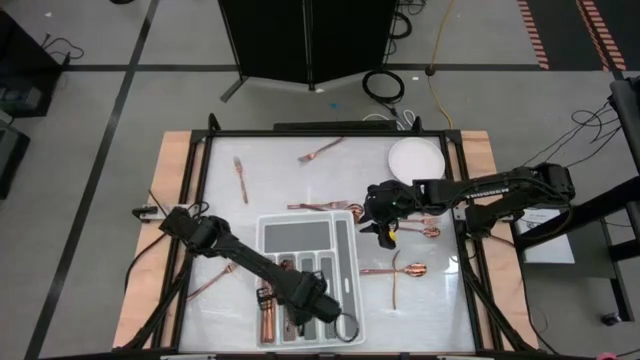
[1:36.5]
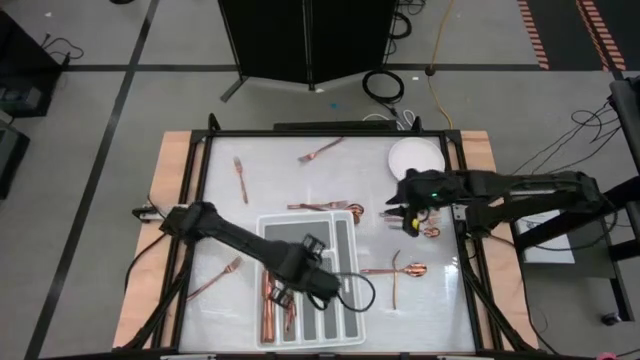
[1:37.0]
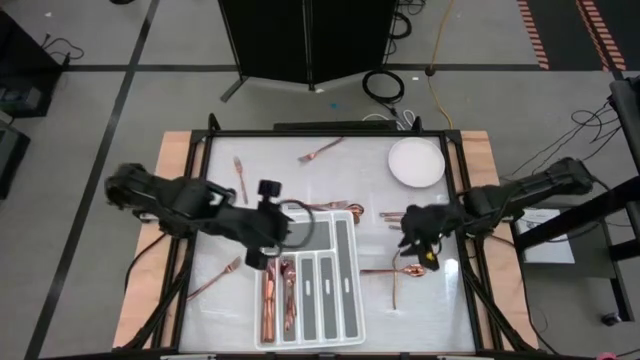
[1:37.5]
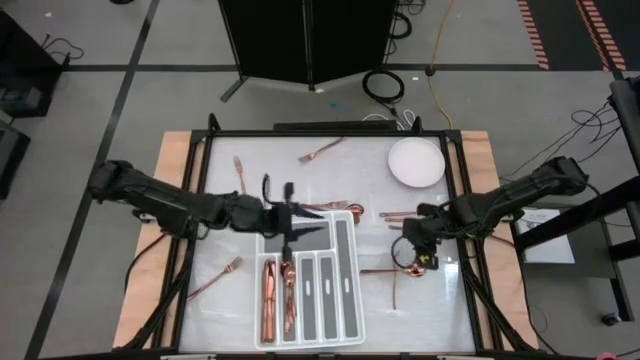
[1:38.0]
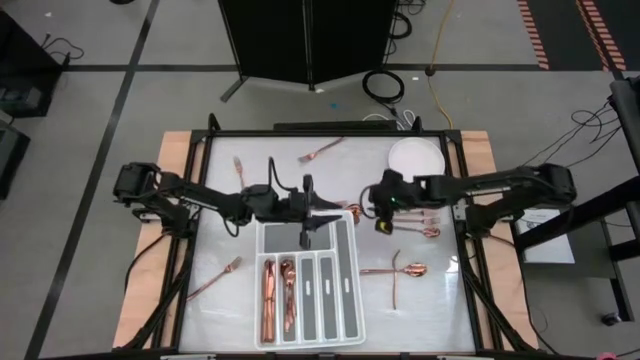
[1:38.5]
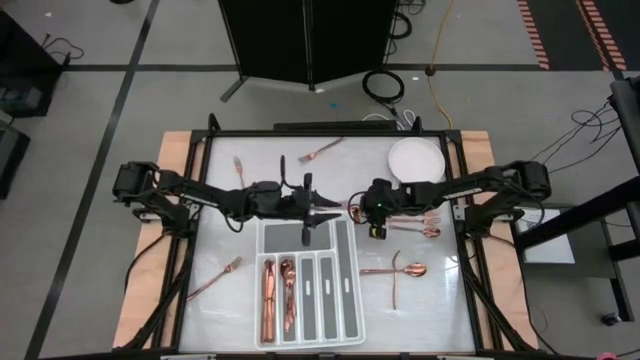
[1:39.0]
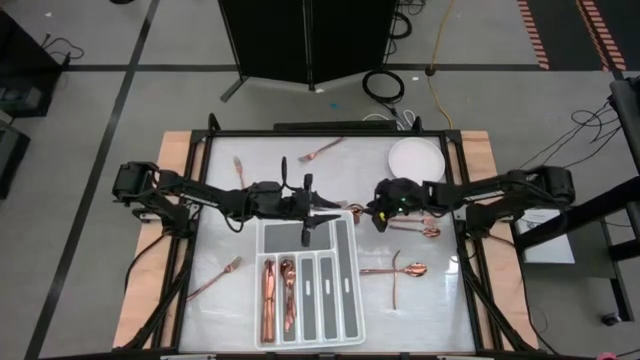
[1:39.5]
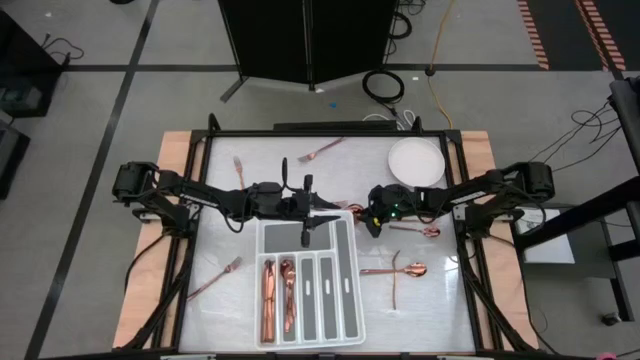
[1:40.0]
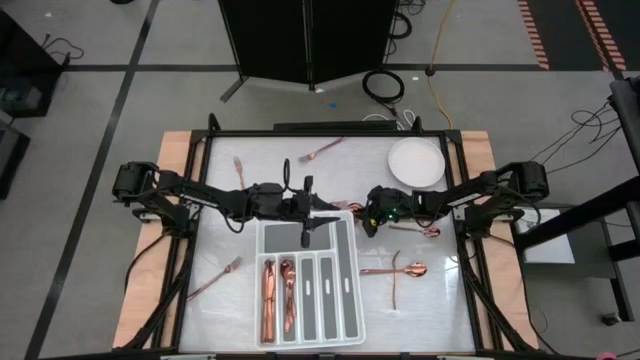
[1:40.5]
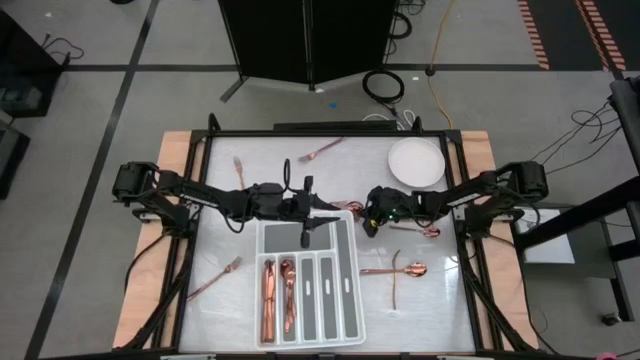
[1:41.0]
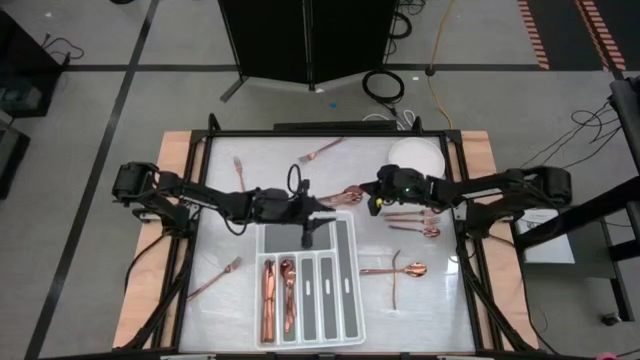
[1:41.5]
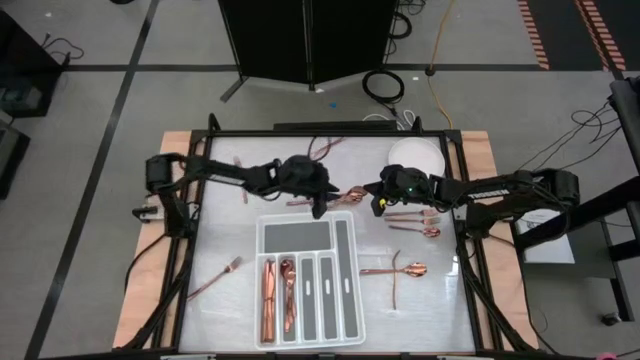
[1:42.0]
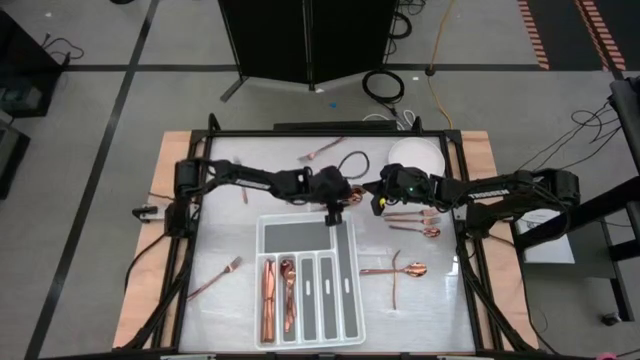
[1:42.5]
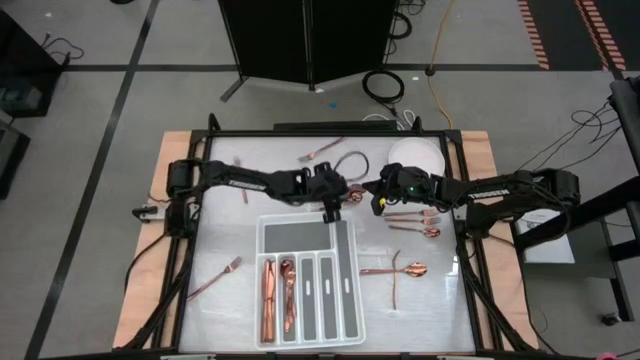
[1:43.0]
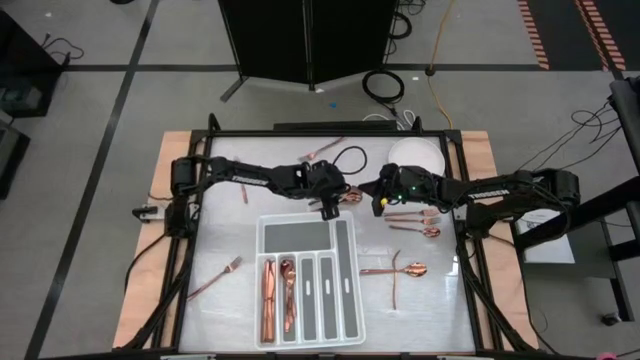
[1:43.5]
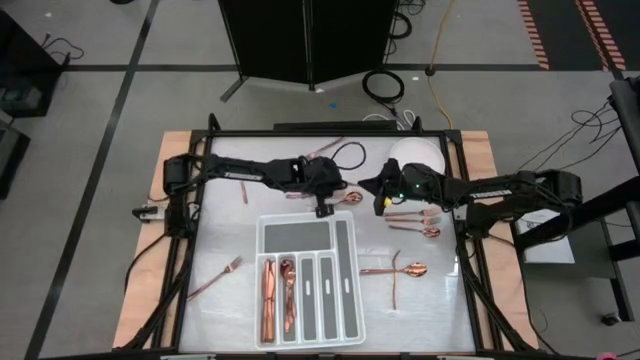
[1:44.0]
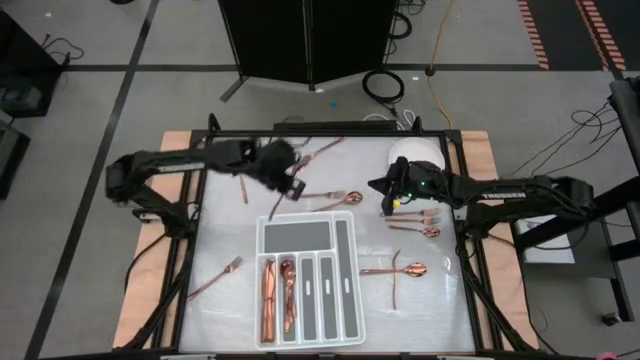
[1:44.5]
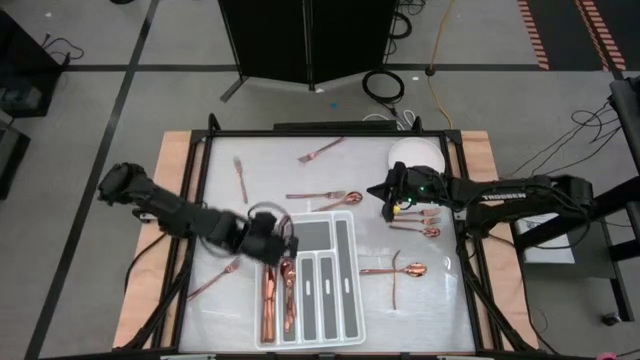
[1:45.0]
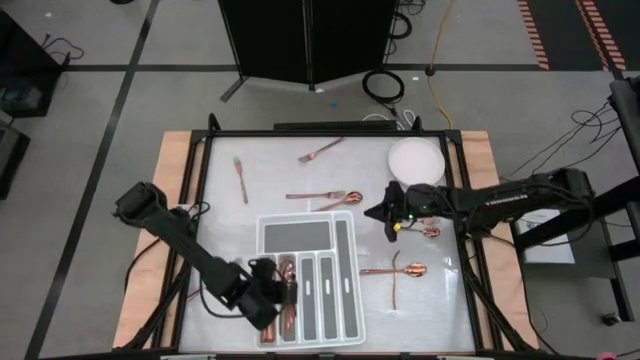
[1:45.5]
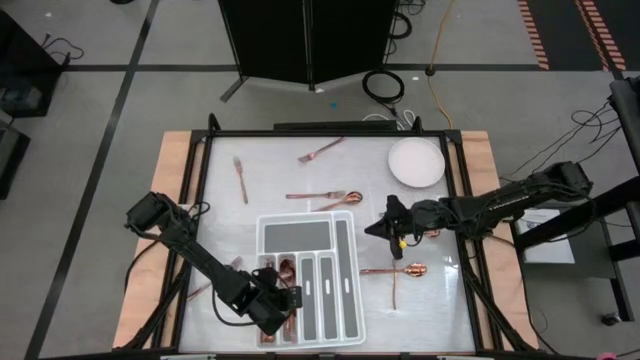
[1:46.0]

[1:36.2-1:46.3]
Task: Sort silverware
Put the spoon into the silverware tray

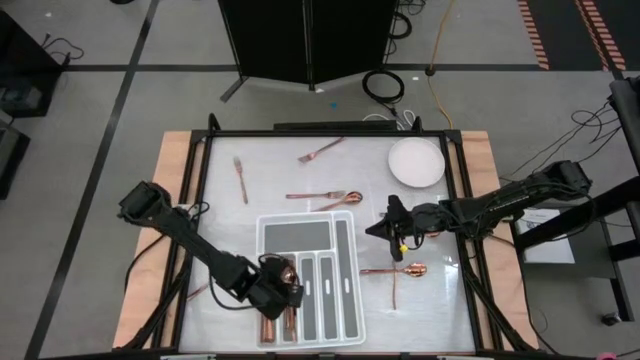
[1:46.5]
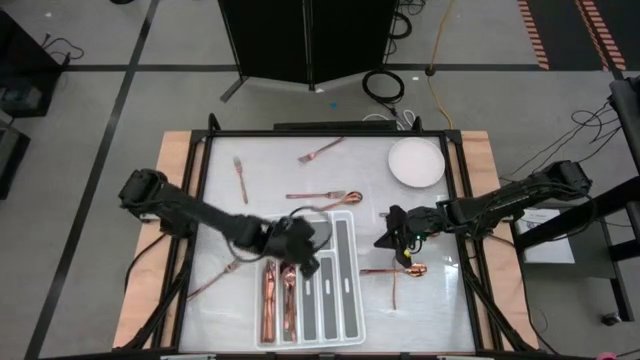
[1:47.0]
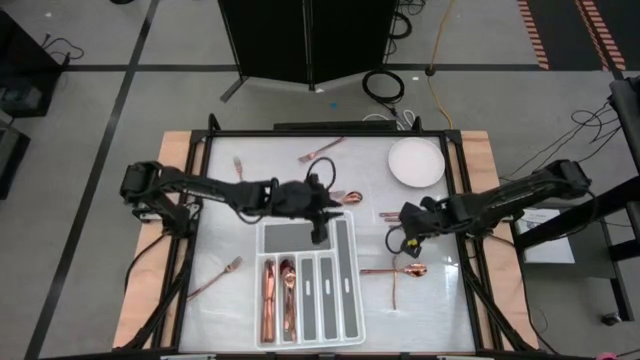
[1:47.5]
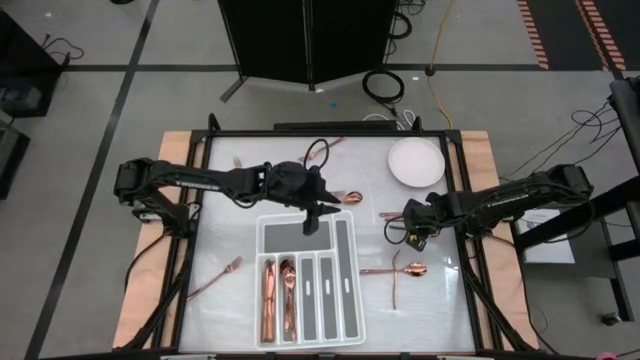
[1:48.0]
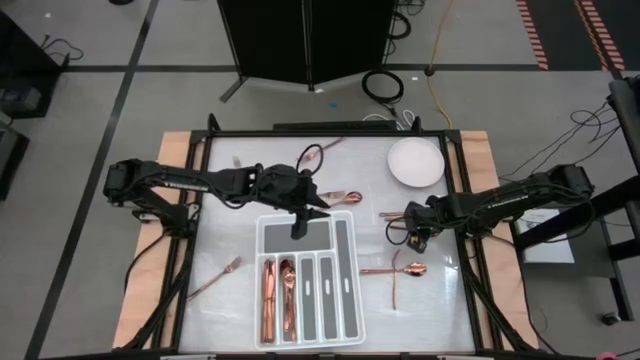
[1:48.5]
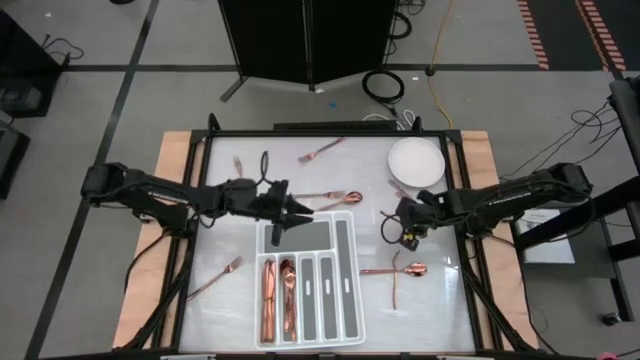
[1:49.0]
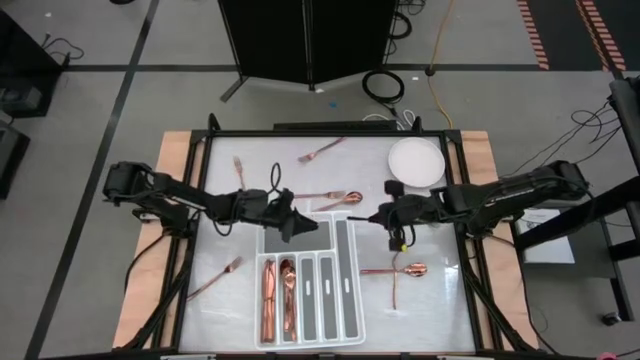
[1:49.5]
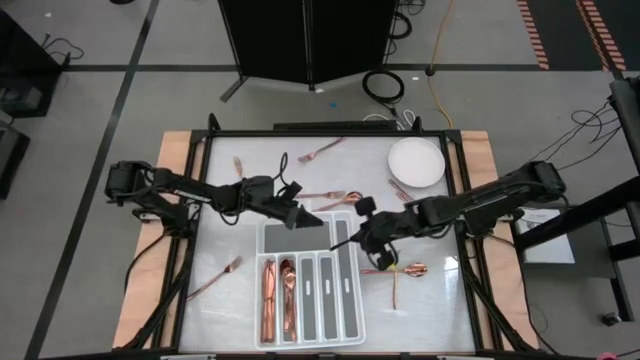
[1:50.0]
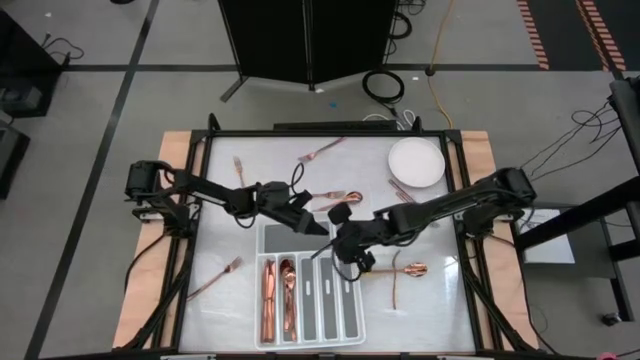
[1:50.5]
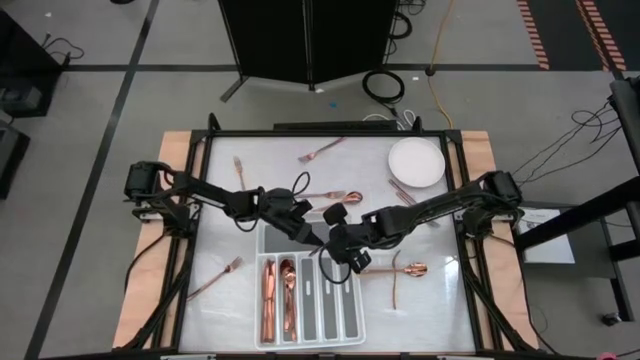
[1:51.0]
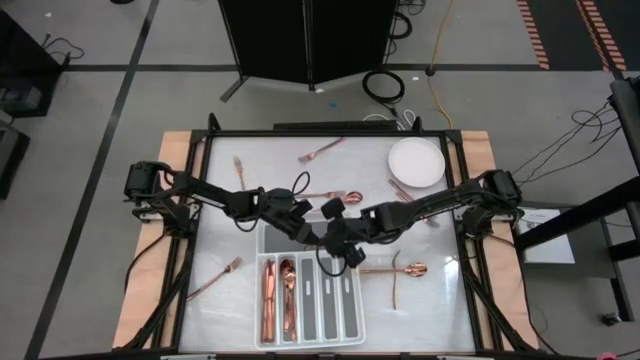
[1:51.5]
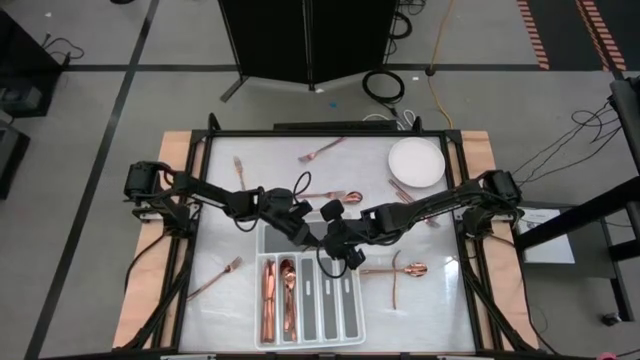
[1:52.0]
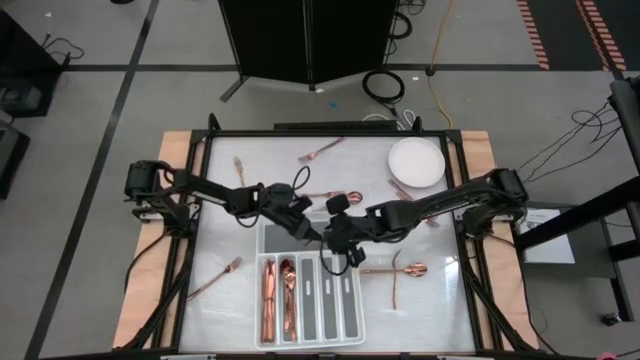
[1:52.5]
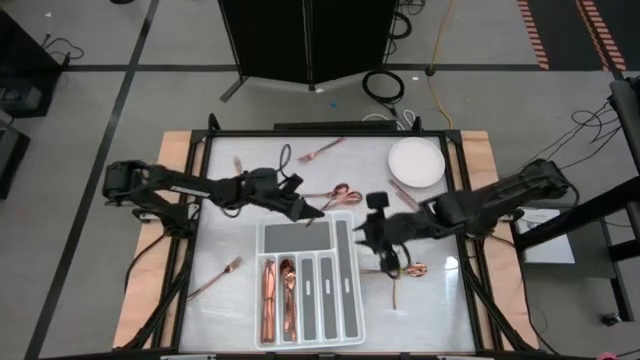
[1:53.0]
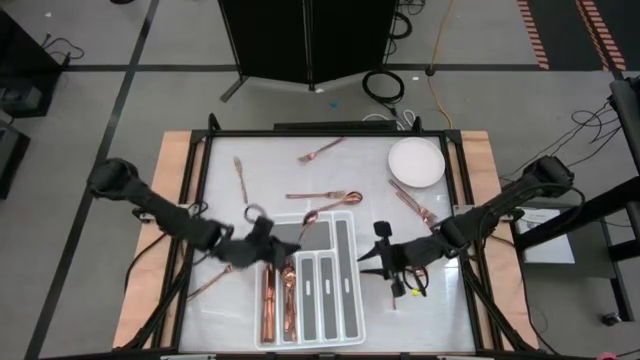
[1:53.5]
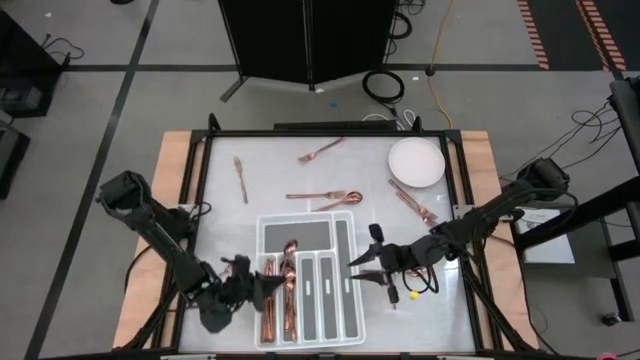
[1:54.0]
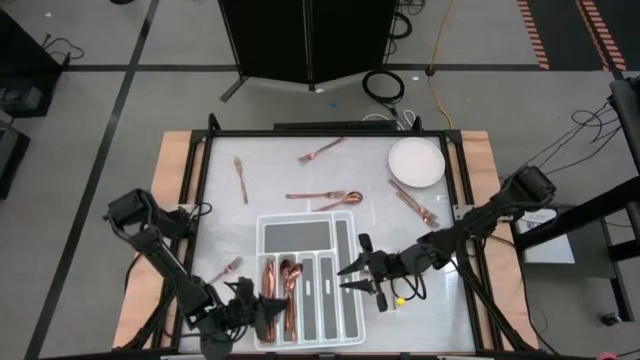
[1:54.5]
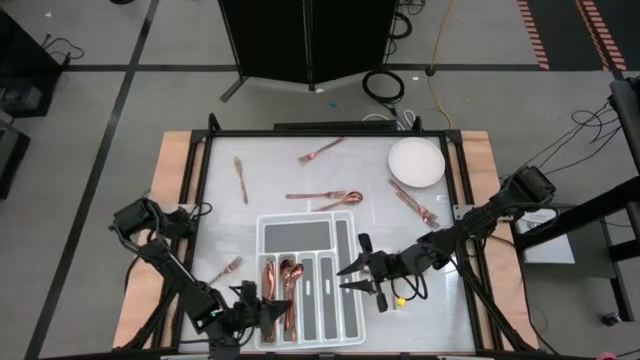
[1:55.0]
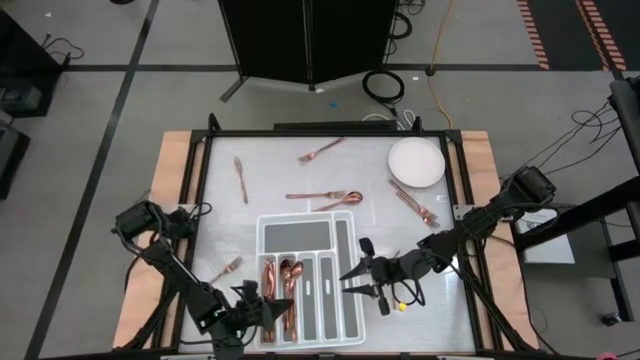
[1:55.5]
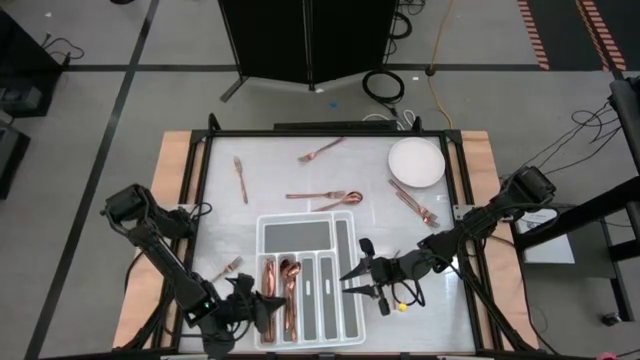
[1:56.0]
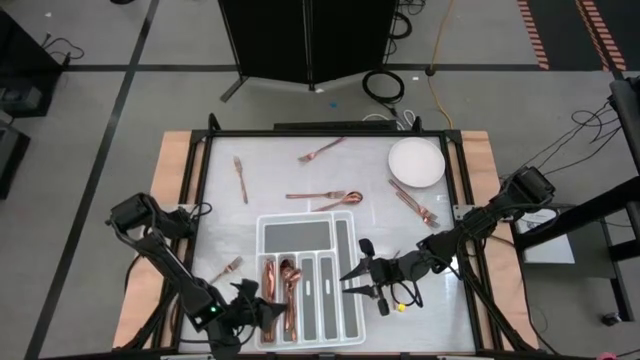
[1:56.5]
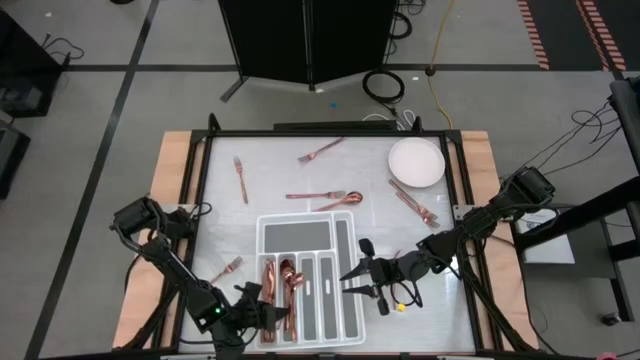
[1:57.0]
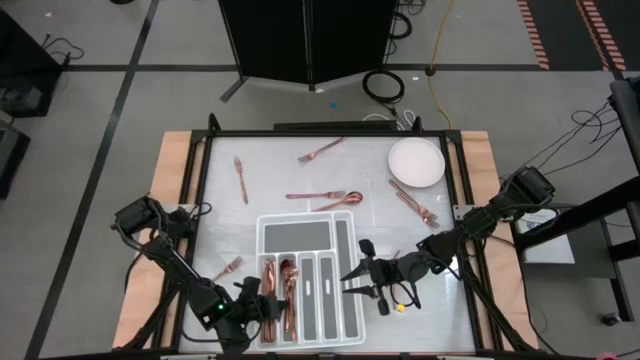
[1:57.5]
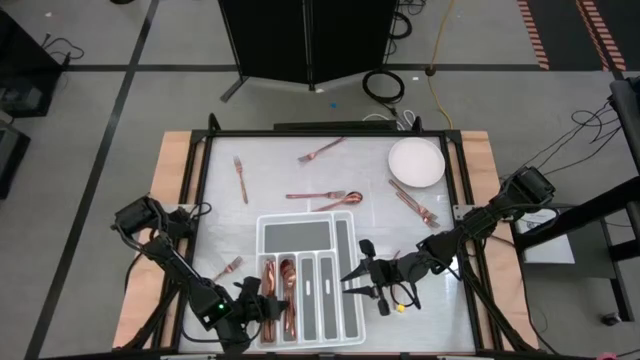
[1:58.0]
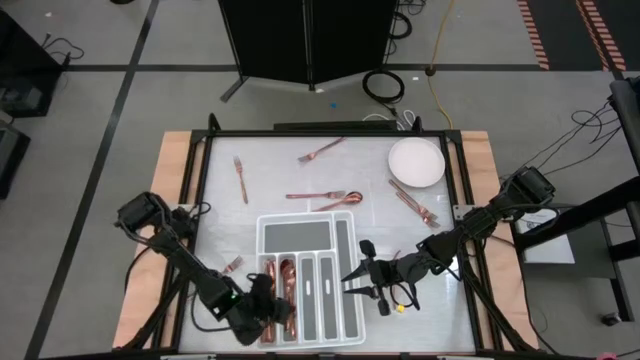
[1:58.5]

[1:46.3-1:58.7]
Put the top right spoon into the silverware tray
